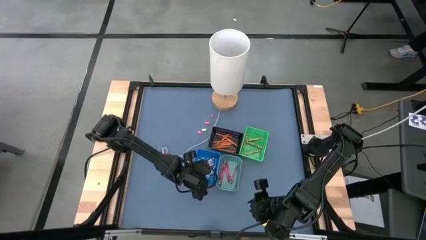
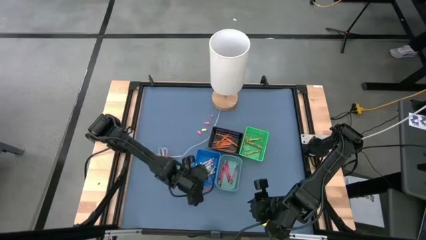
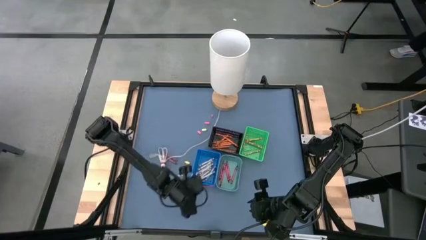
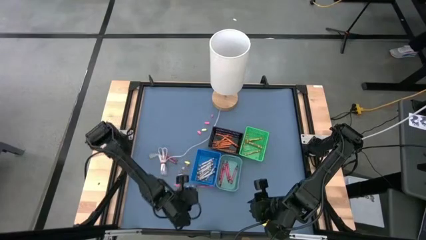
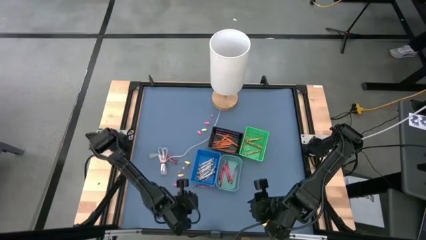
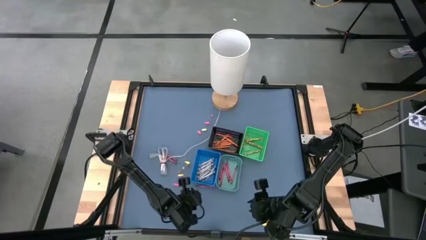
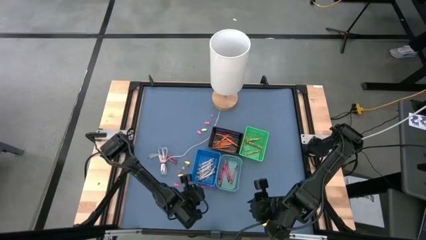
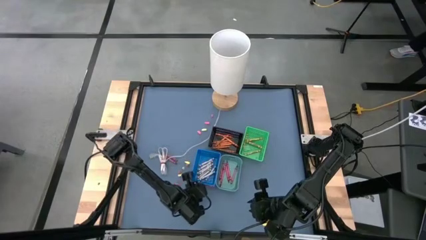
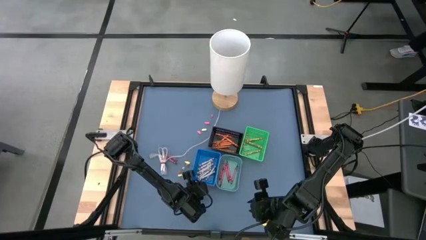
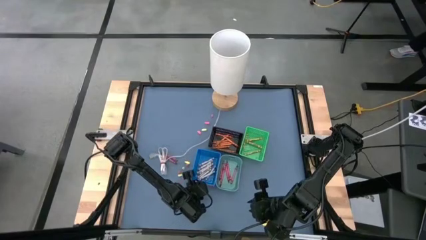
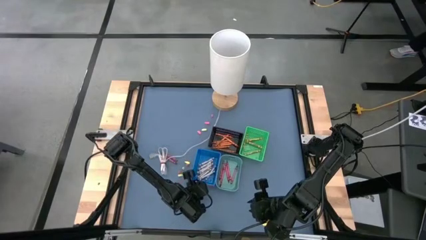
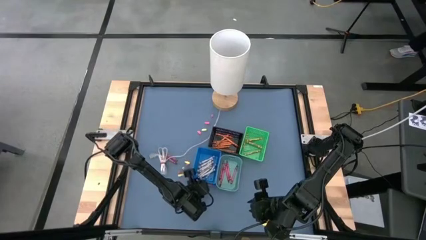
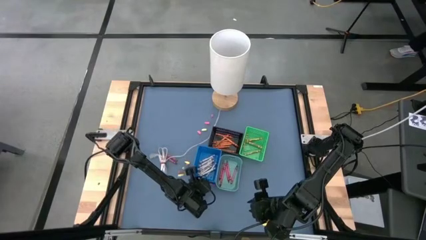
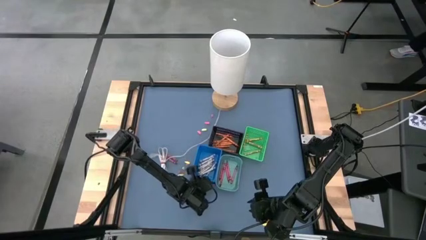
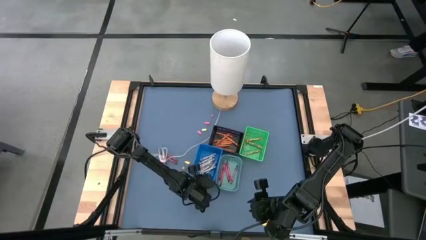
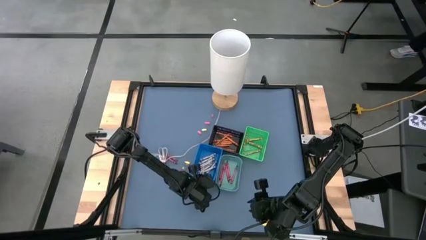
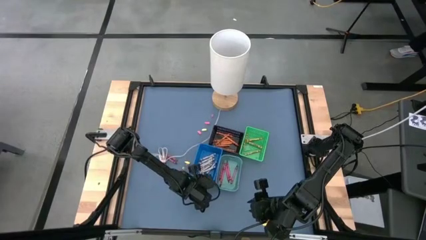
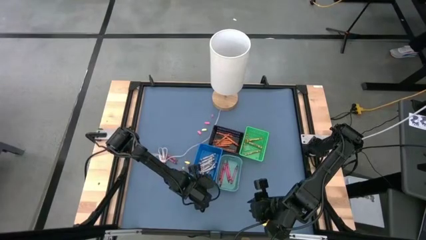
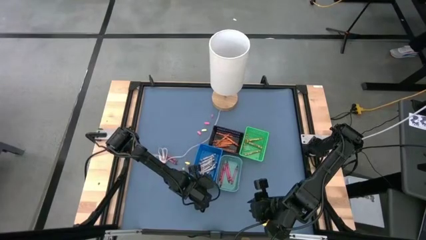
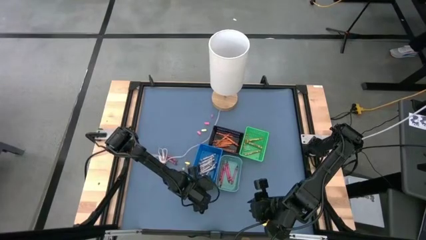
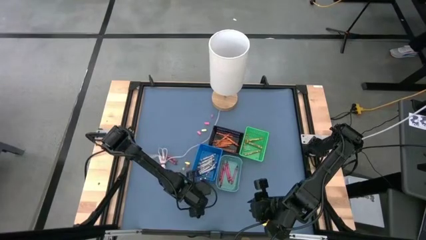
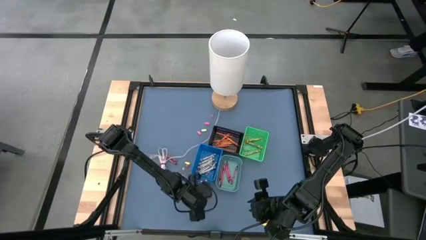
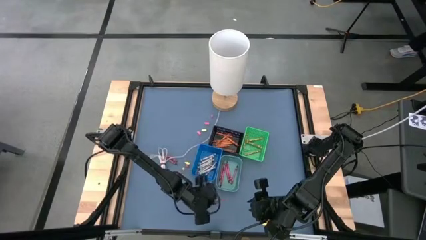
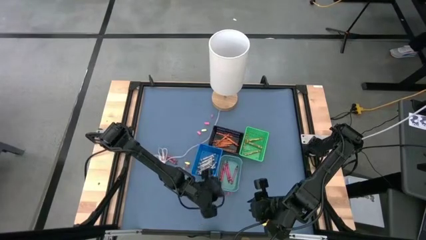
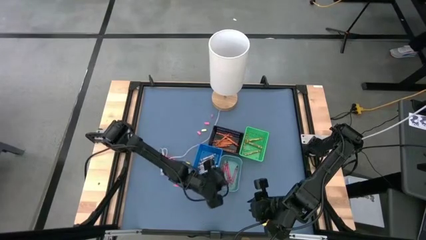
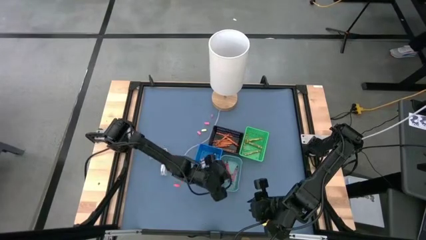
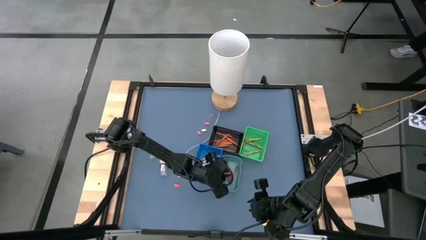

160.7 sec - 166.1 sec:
Task: Sort crayons
Put the red crayon into the light green bin

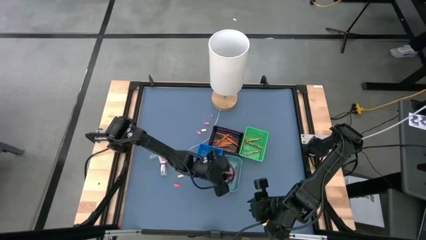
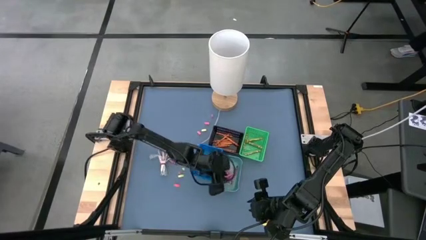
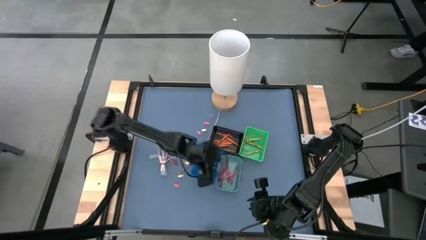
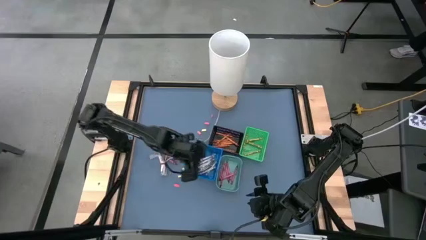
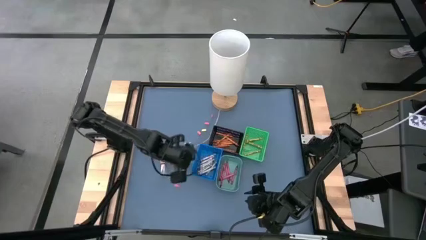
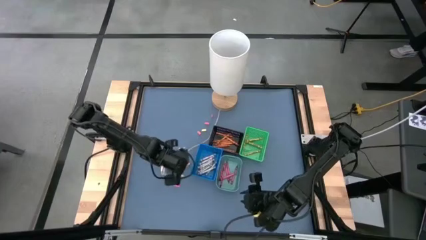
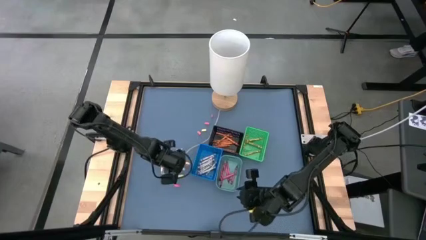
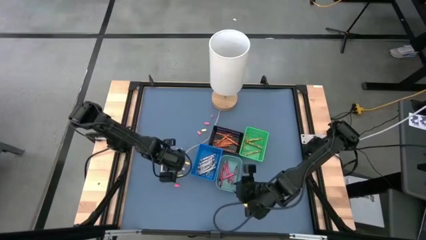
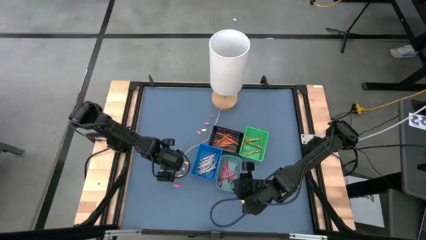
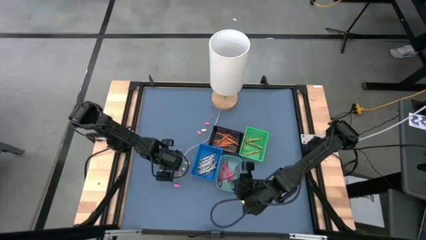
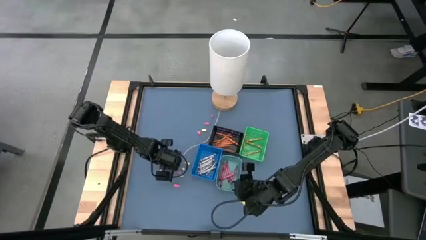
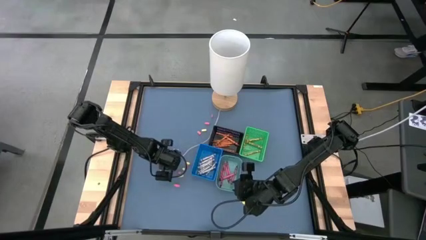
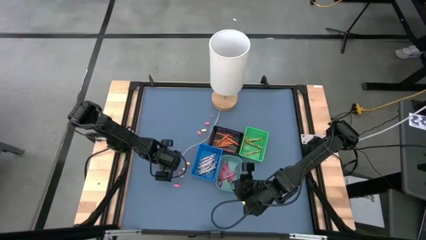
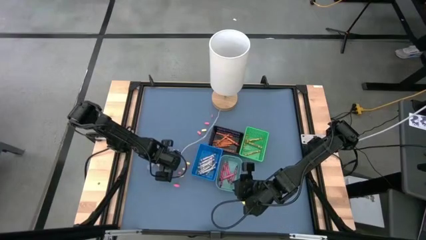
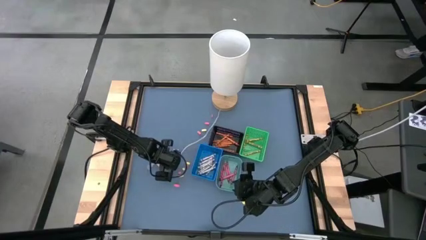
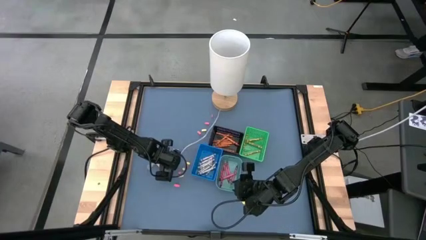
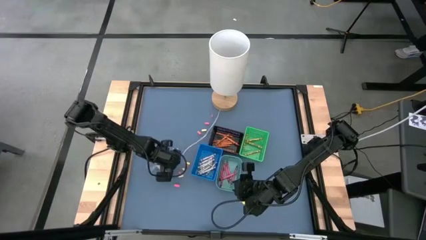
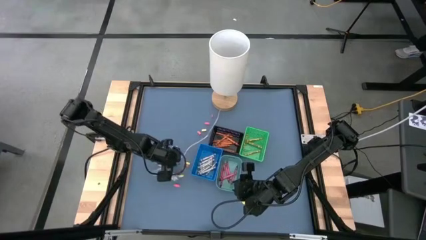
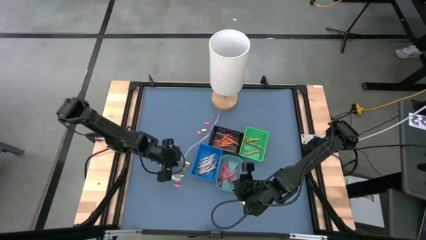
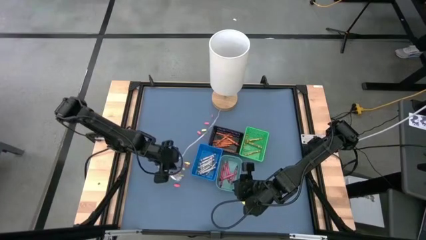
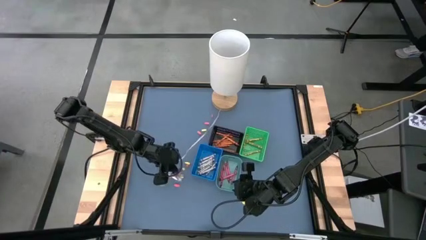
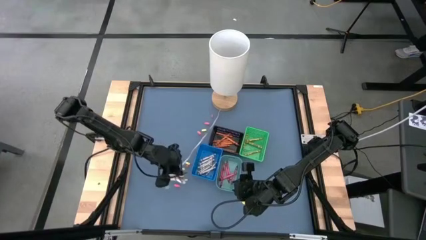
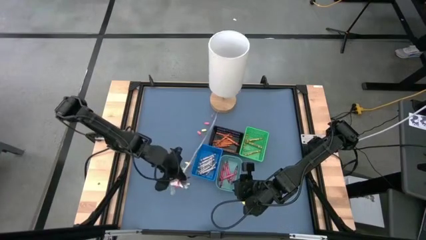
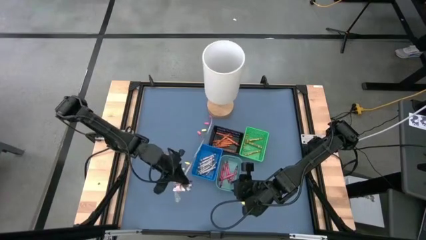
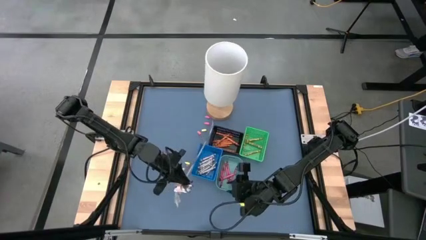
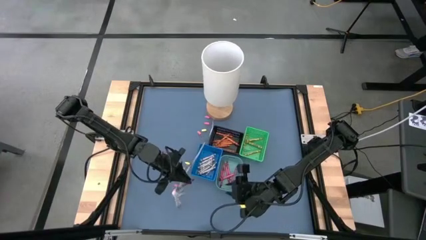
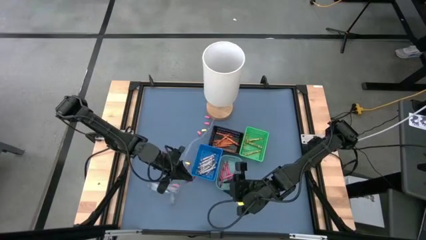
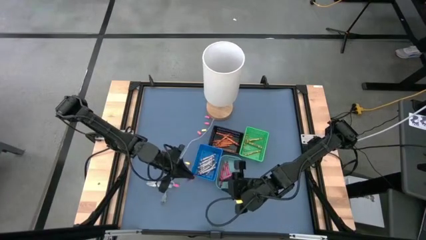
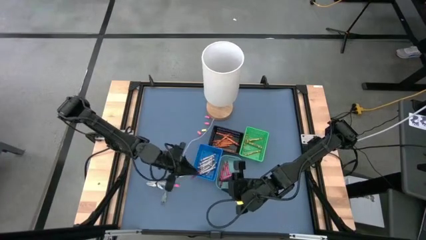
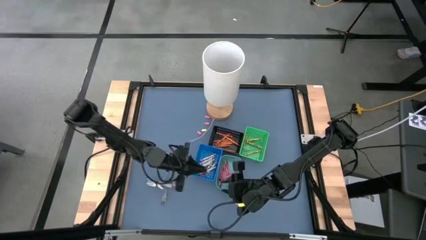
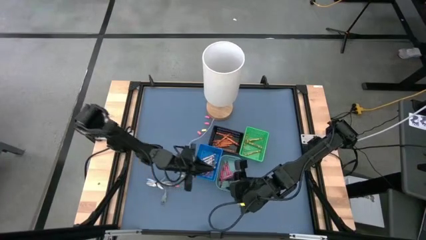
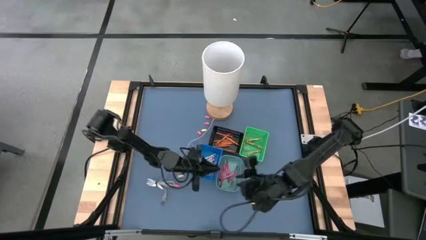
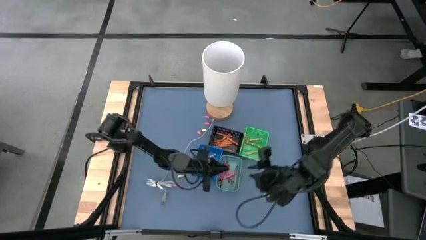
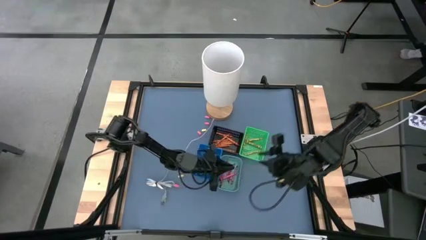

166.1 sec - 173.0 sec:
Put the red crayon into the light green bin

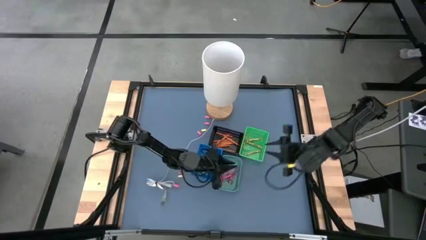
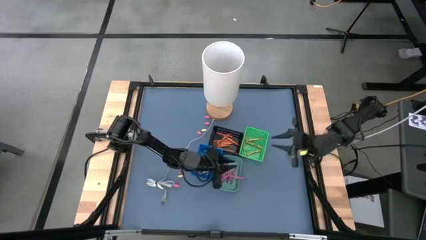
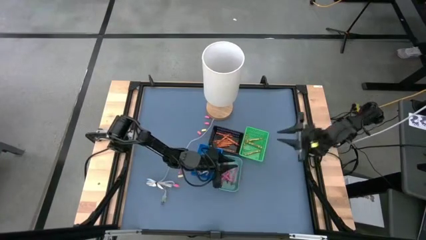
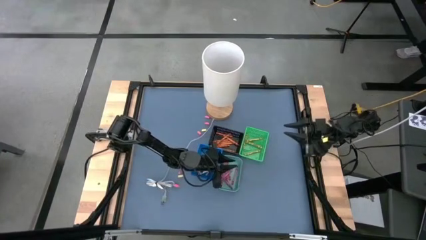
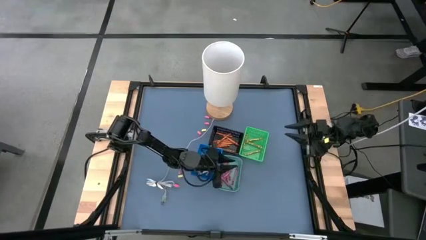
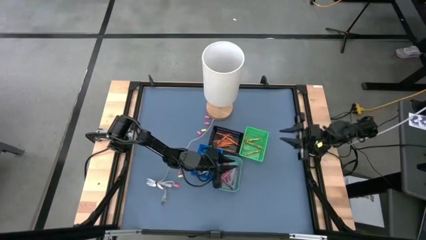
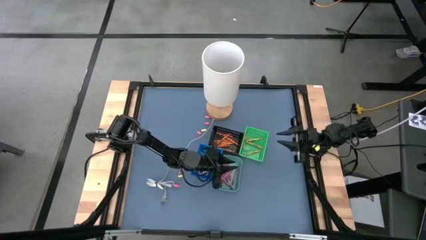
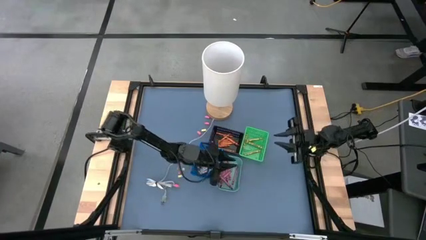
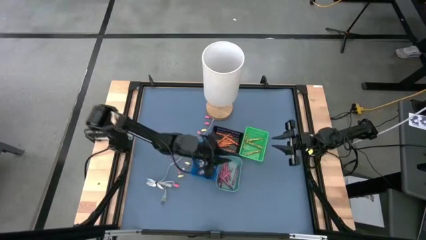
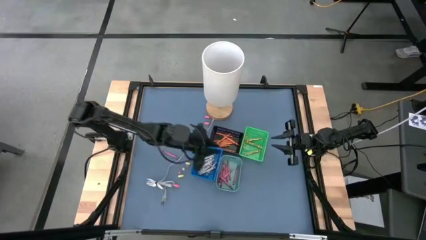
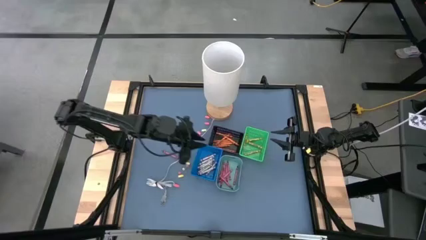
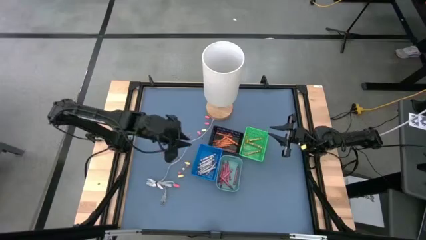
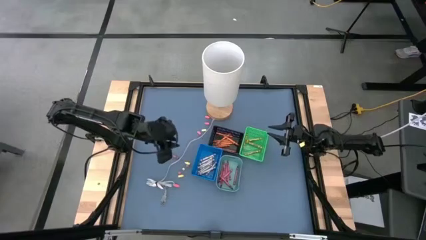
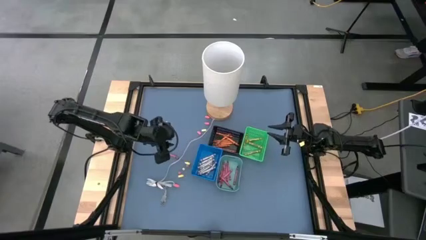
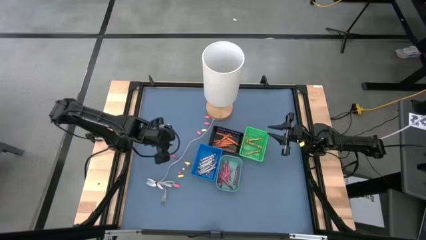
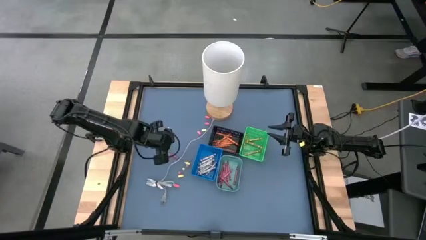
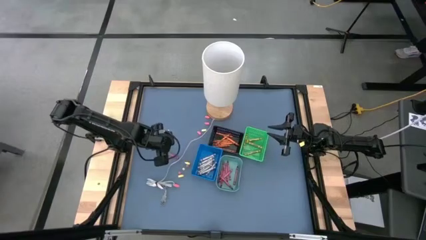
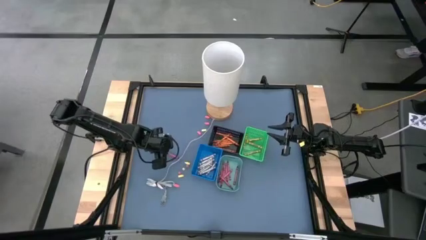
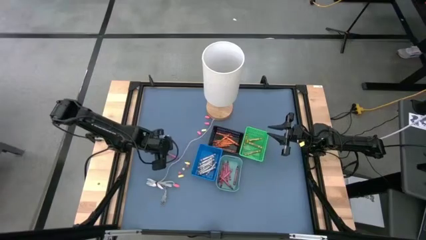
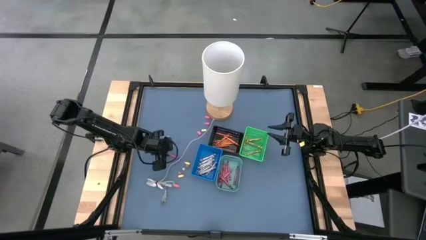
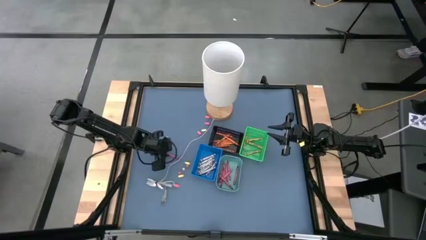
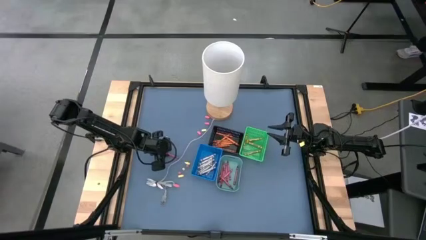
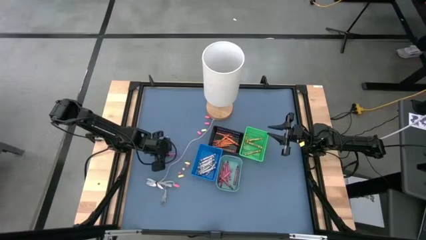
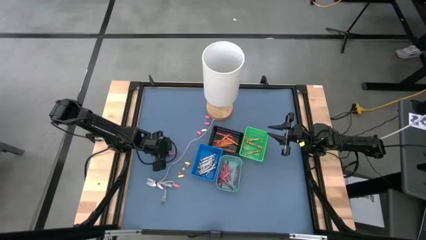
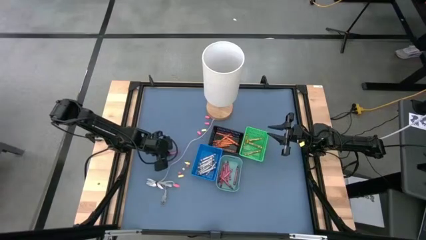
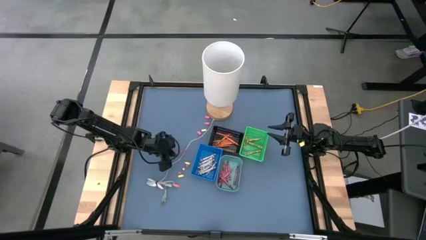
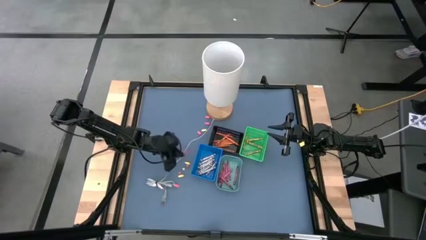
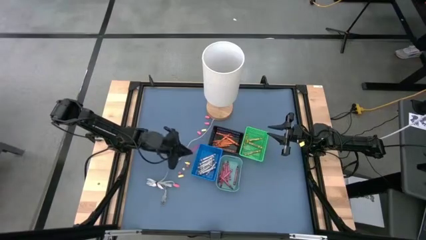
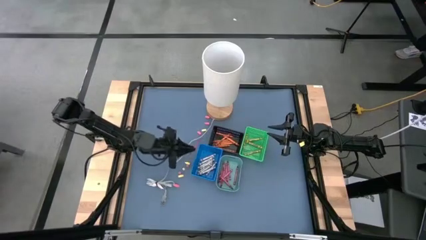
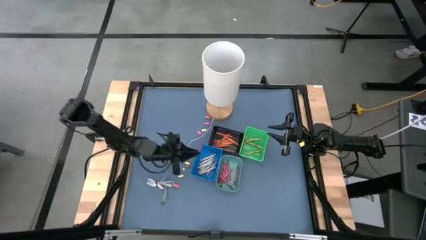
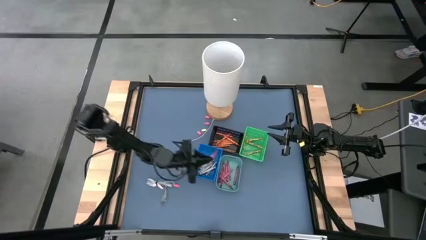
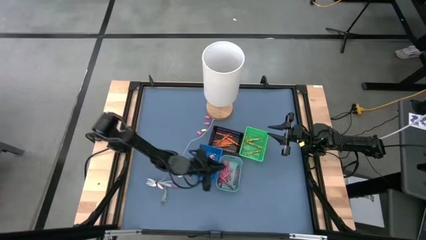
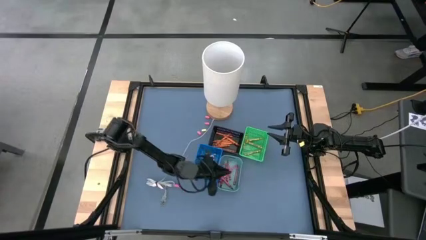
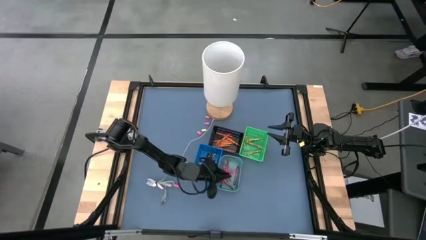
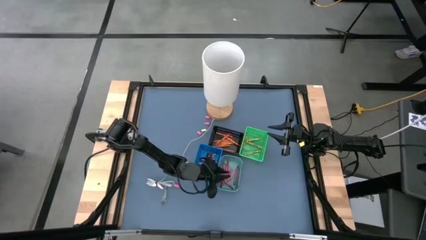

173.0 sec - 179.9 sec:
Put the red crayon into the light green bin
